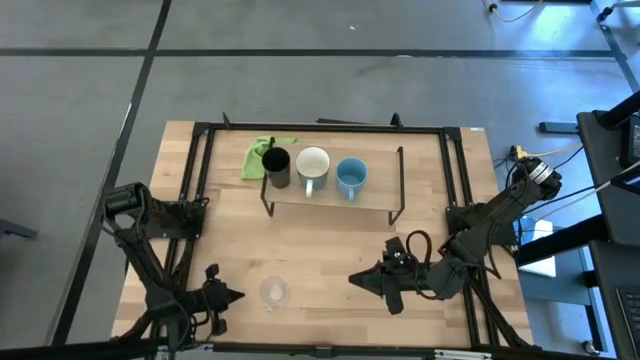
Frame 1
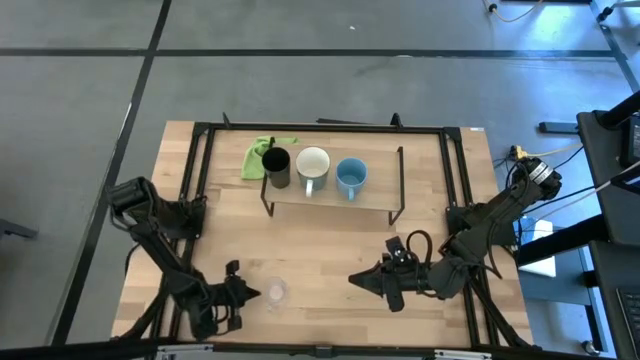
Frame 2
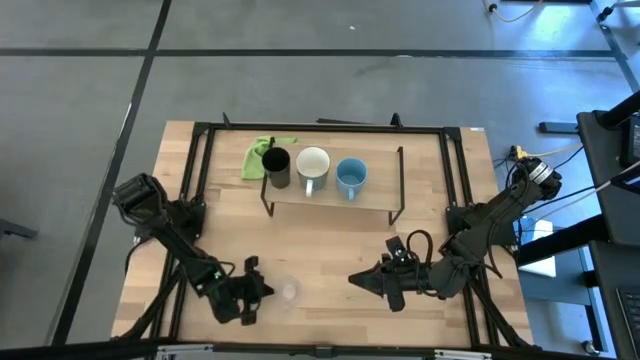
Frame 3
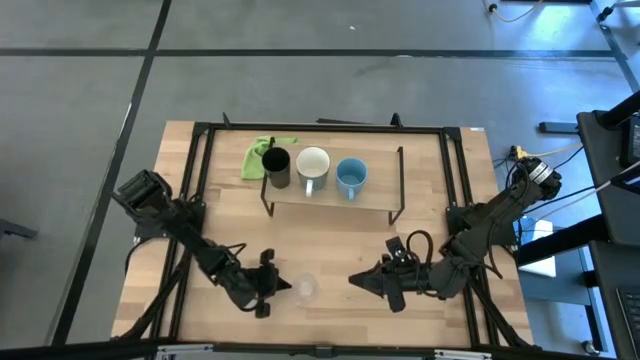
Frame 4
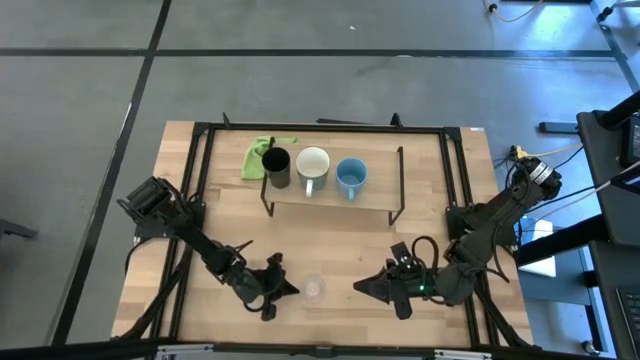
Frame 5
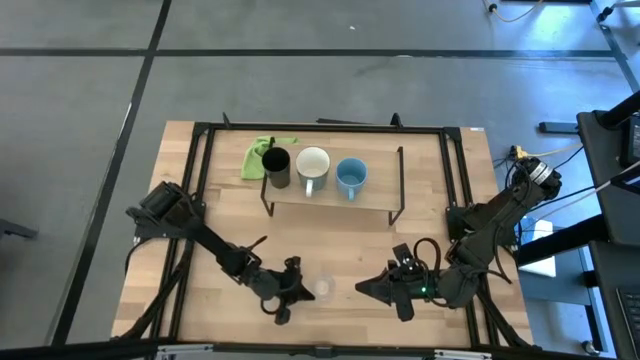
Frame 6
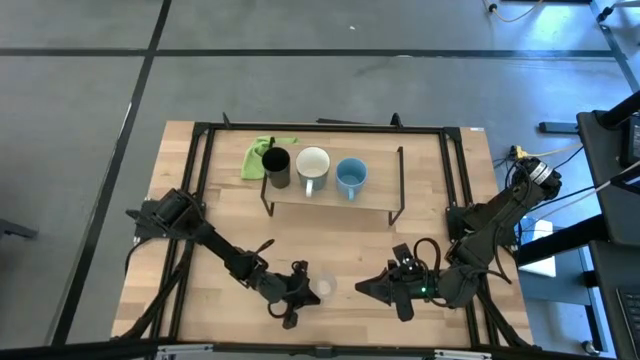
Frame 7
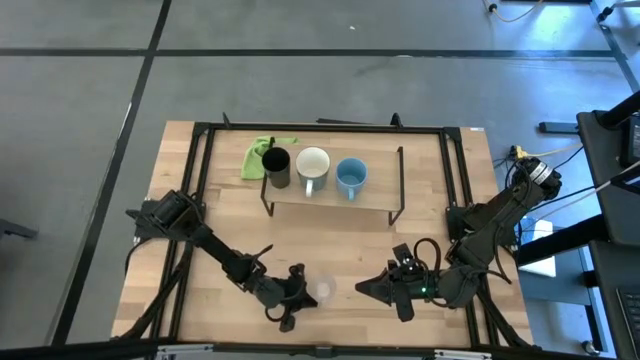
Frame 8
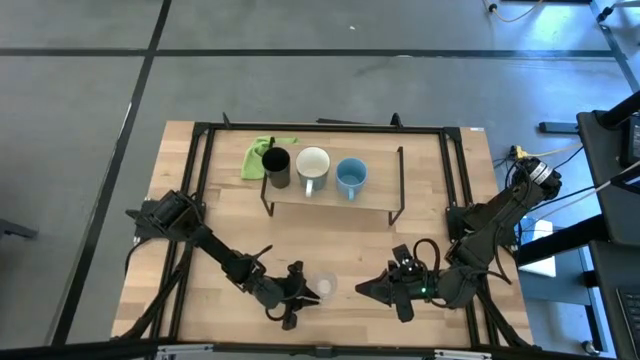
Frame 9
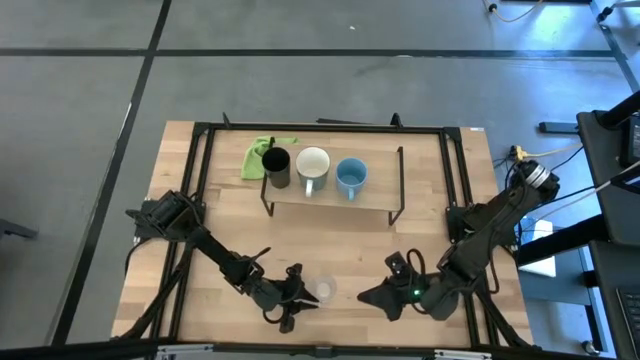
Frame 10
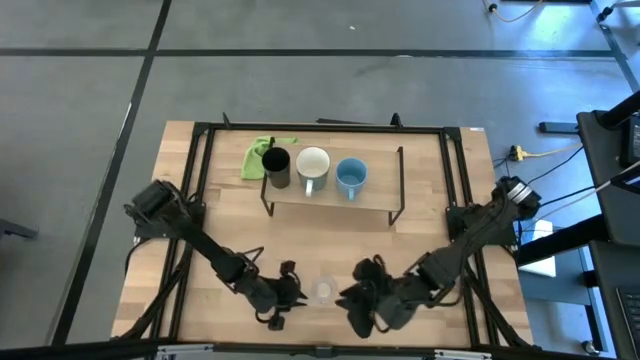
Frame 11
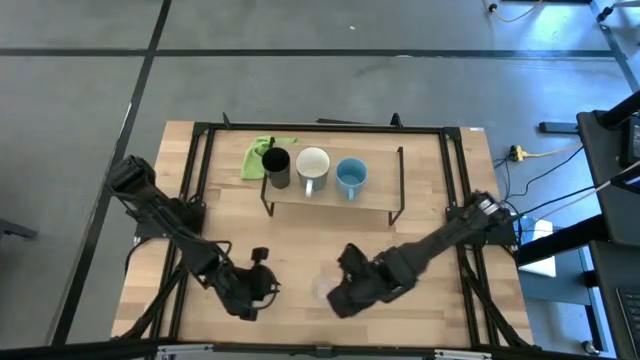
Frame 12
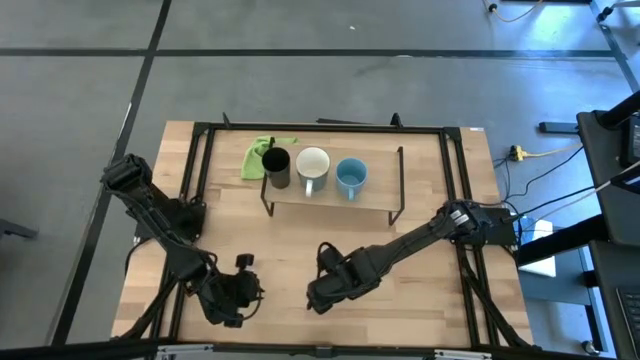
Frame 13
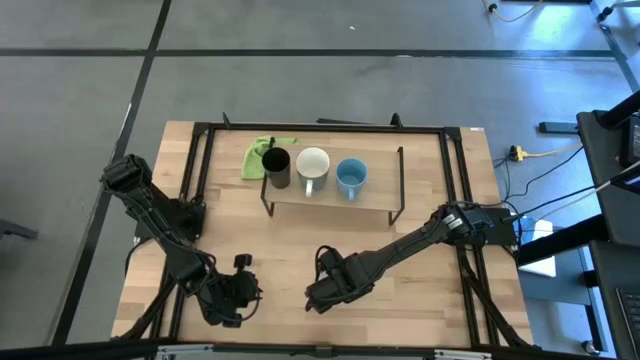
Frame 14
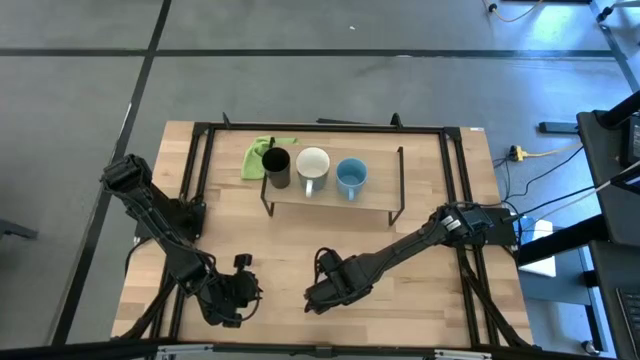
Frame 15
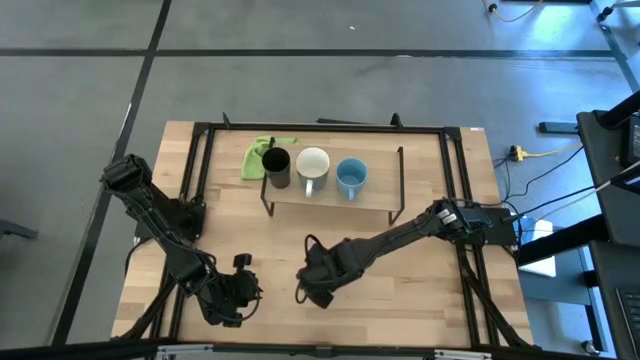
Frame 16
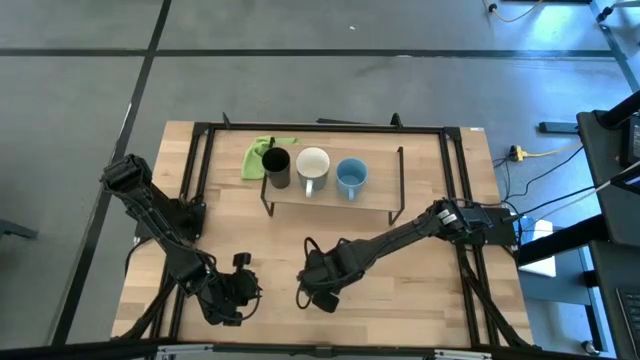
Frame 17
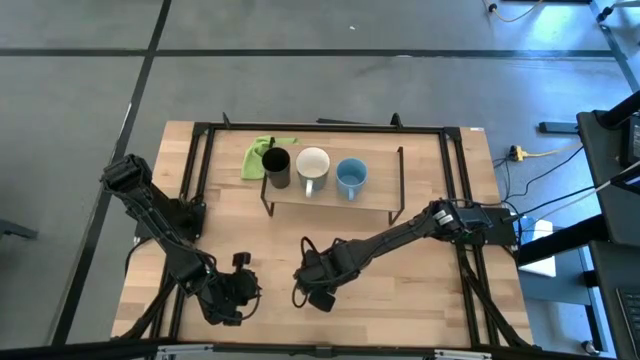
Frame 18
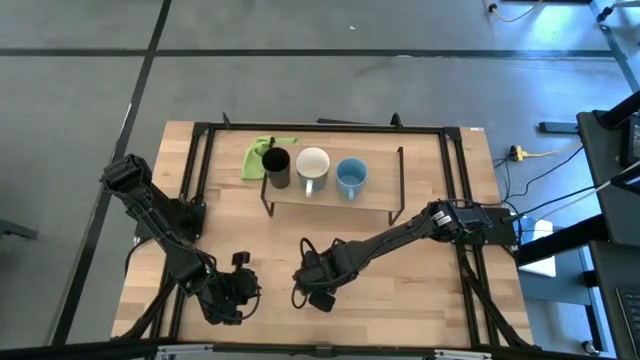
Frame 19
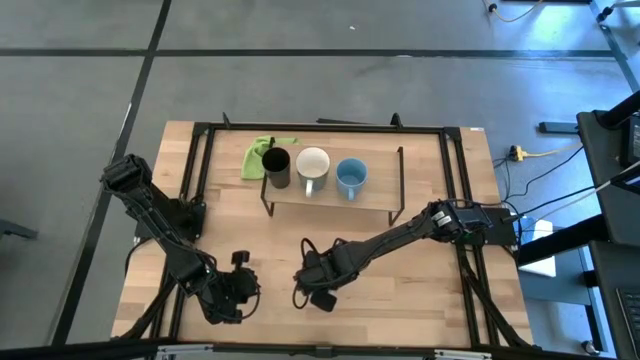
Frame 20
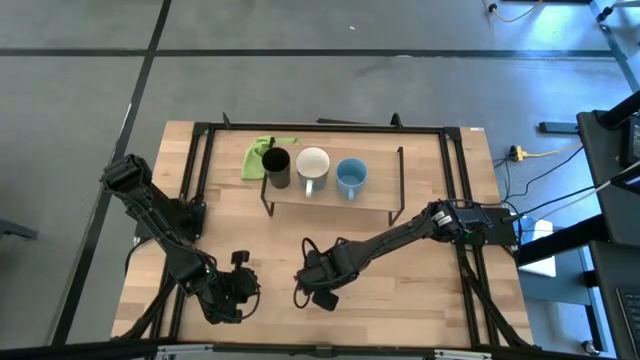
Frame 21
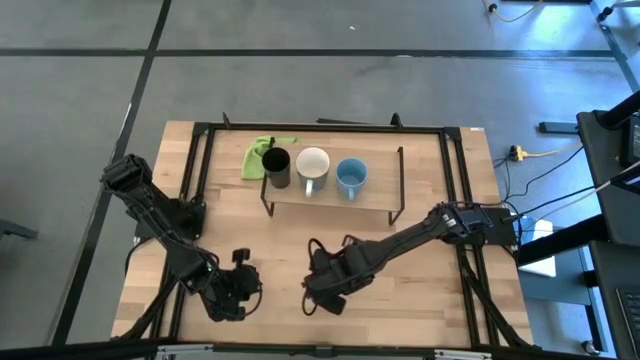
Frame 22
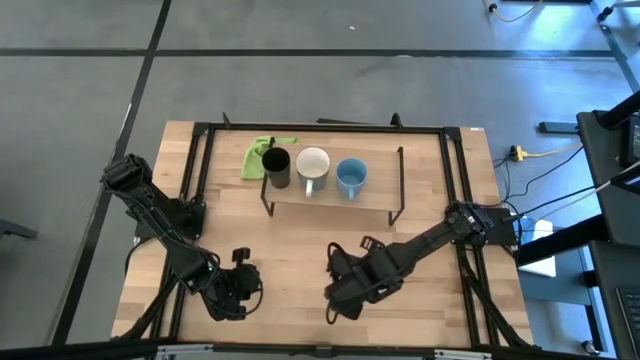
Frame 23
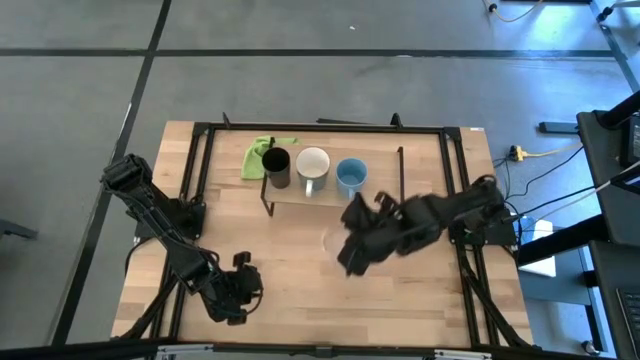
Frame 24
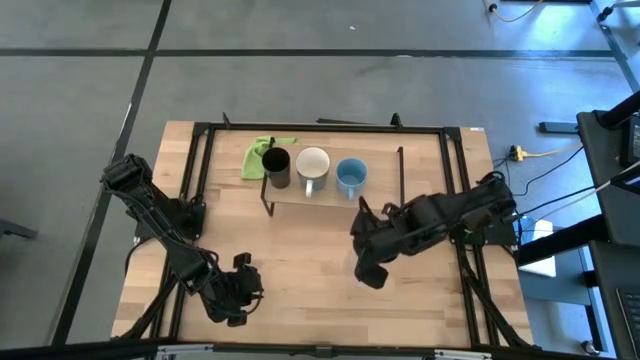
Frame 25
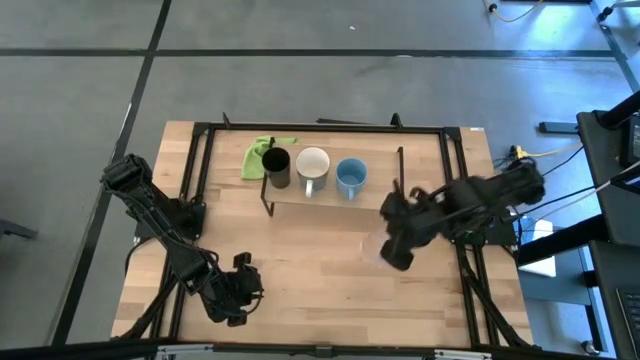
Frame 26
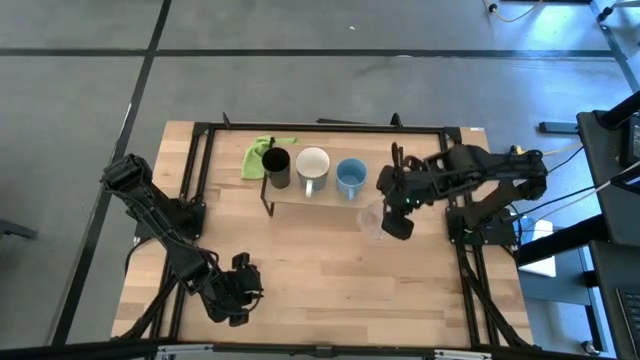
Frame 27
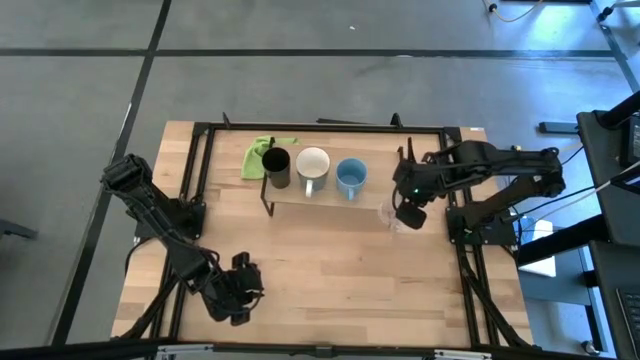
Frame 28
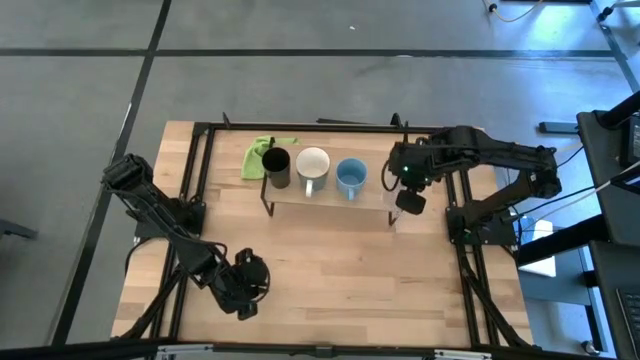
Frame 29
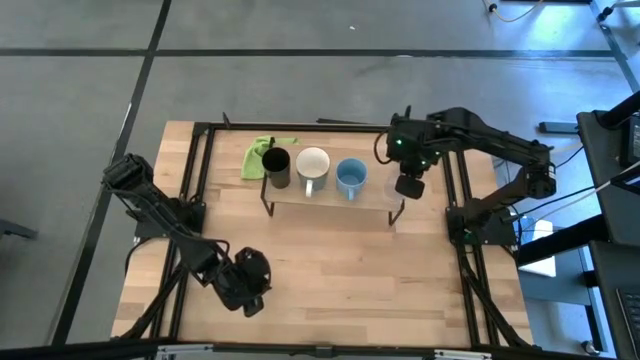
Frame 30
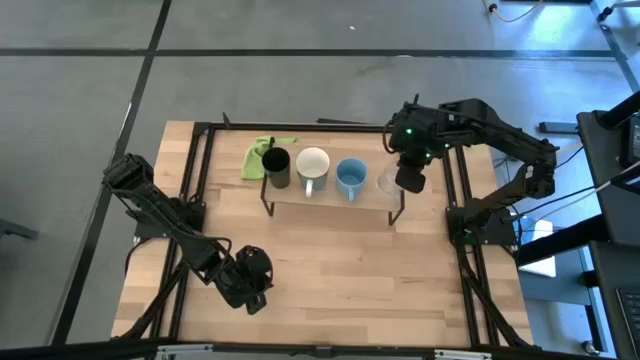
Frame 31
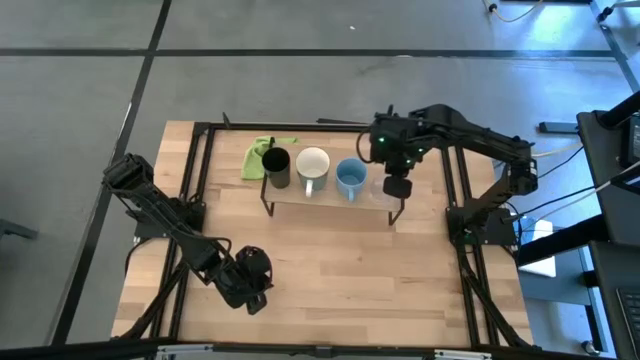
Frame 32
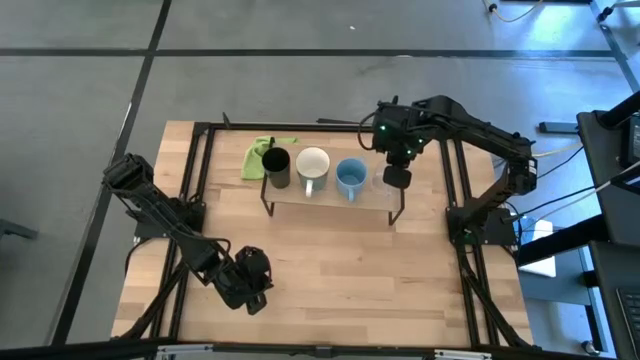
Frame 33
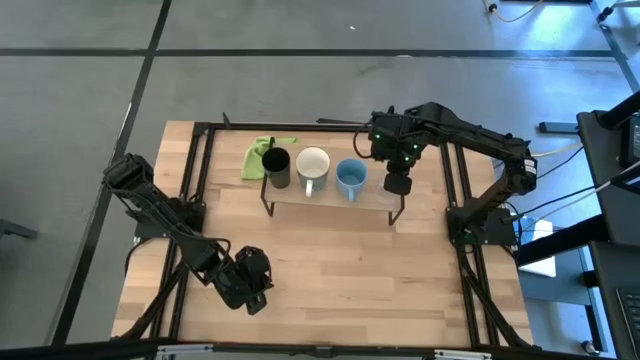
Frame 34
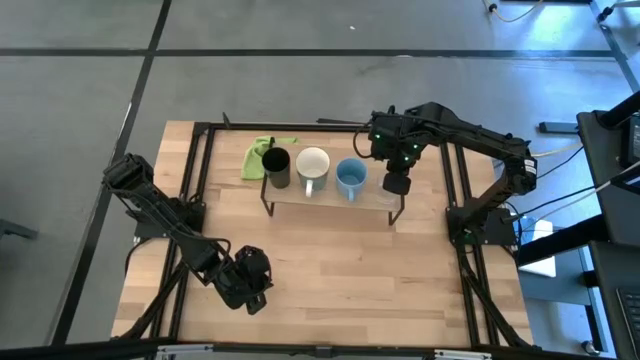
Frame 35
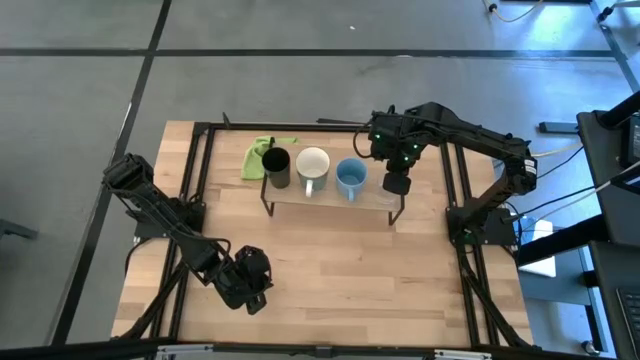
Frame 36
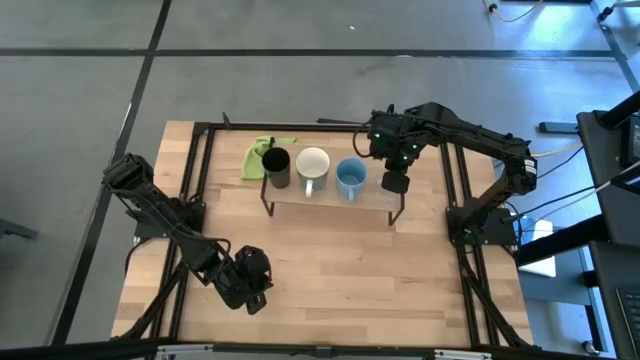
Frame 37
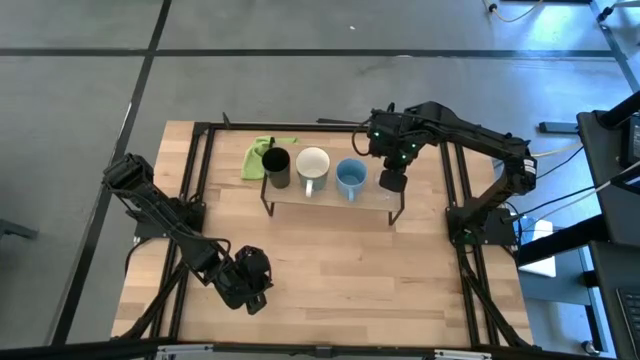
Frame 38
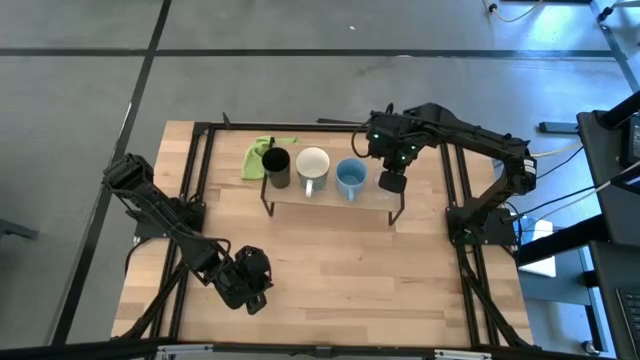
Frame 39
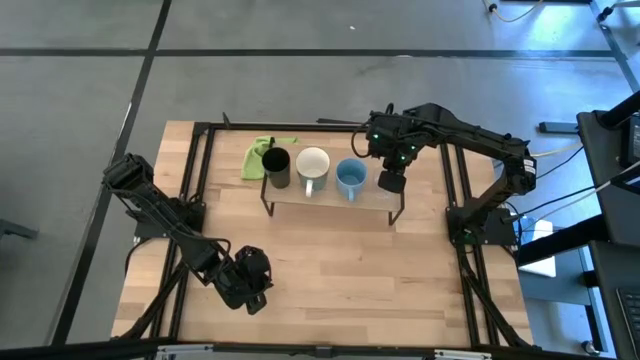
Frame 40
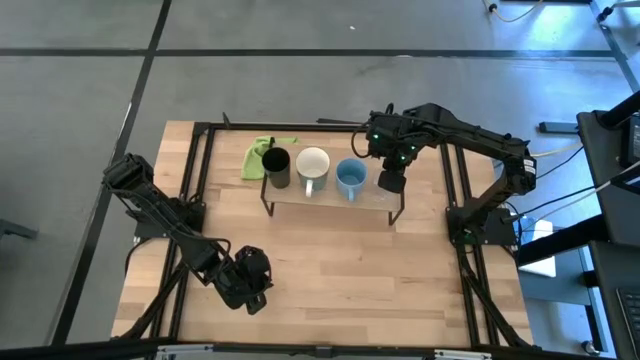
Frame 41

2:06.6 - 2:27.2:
Task: Stack small to large cups/mugs on shelf
Put the transparent mug on the shelf
